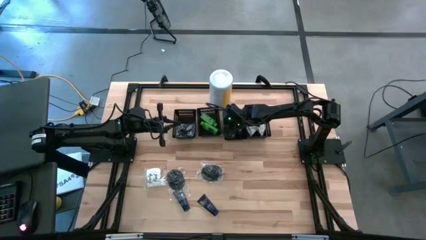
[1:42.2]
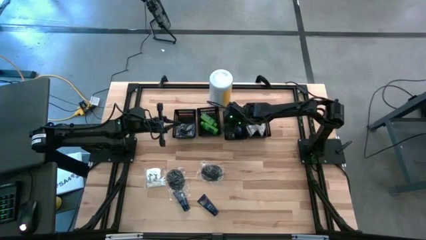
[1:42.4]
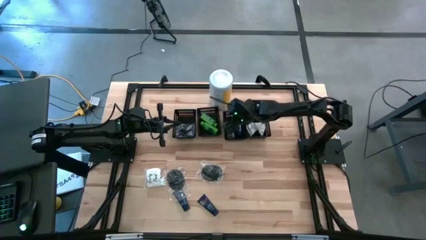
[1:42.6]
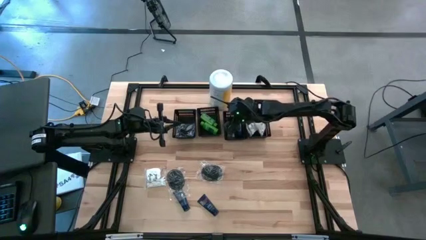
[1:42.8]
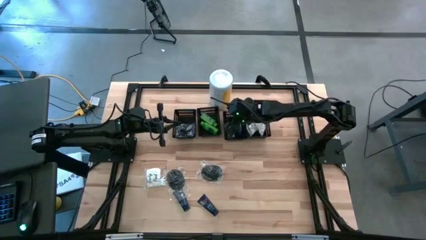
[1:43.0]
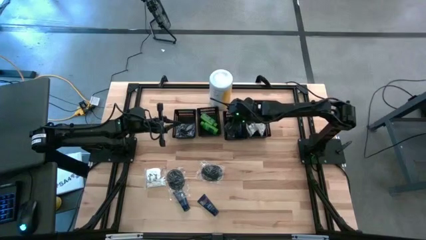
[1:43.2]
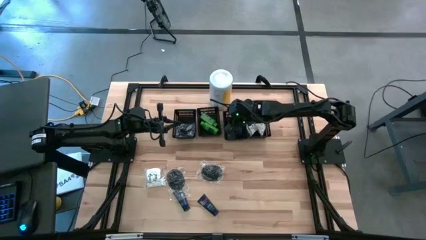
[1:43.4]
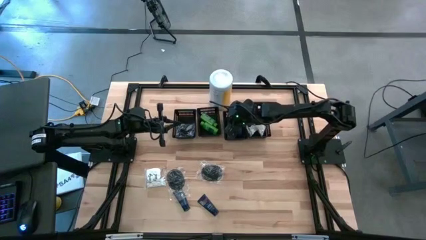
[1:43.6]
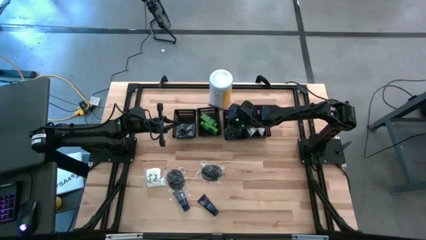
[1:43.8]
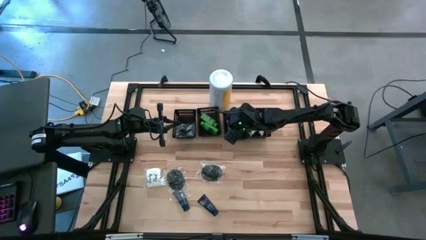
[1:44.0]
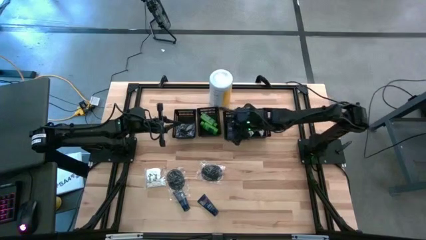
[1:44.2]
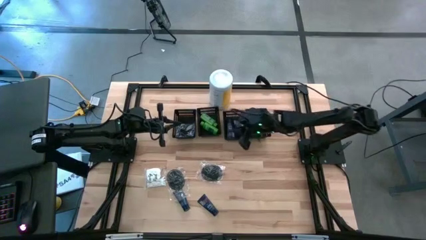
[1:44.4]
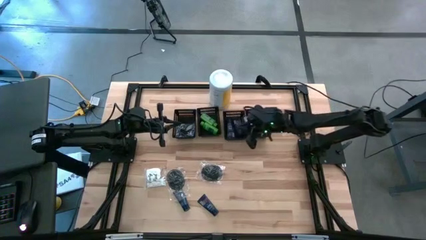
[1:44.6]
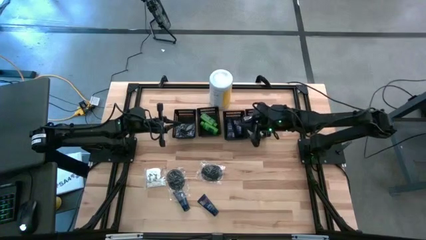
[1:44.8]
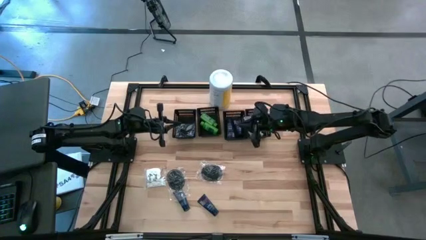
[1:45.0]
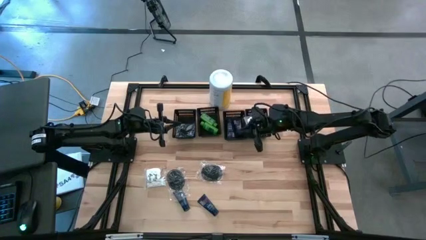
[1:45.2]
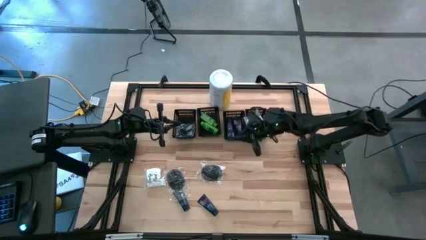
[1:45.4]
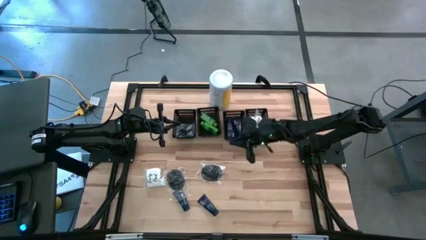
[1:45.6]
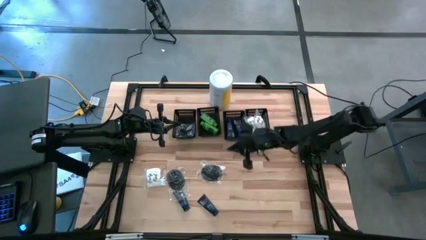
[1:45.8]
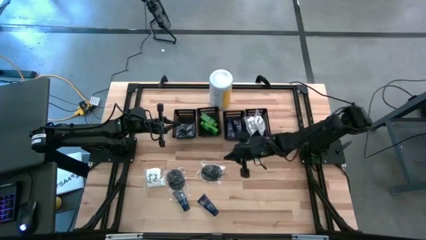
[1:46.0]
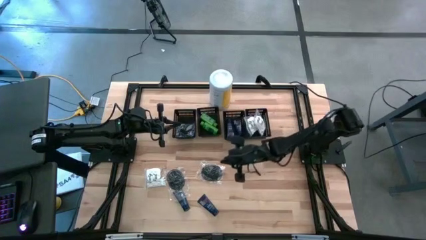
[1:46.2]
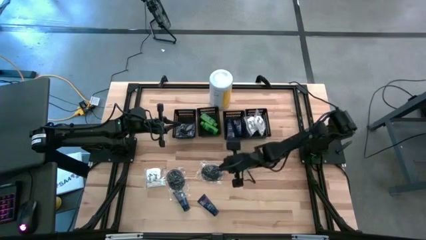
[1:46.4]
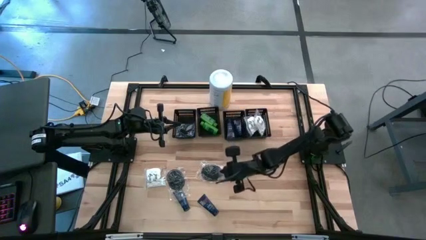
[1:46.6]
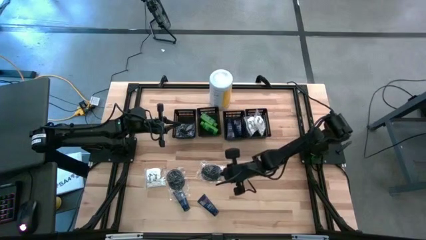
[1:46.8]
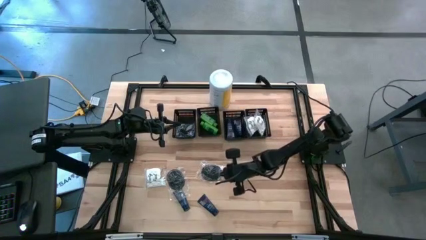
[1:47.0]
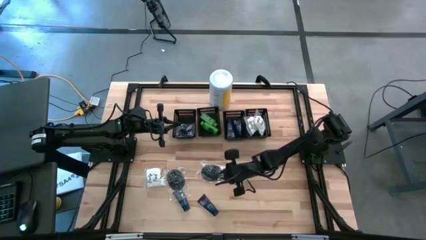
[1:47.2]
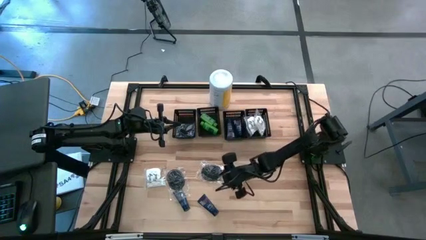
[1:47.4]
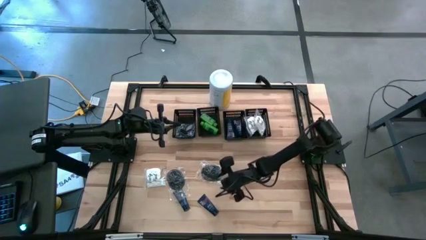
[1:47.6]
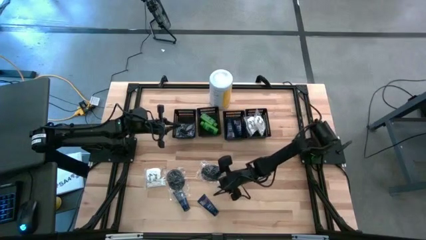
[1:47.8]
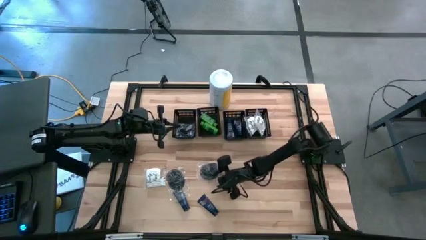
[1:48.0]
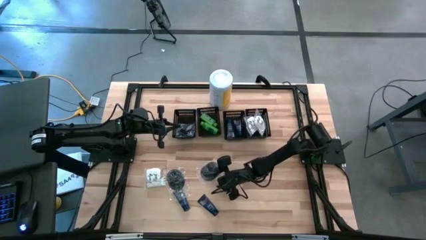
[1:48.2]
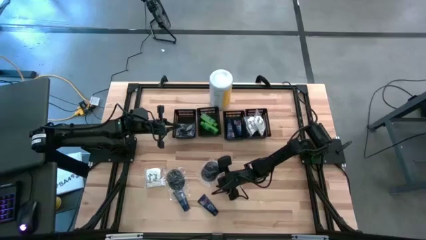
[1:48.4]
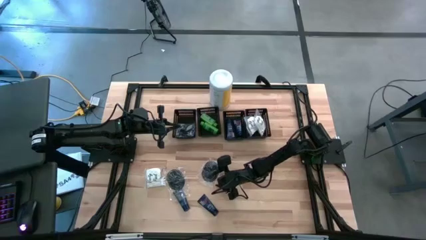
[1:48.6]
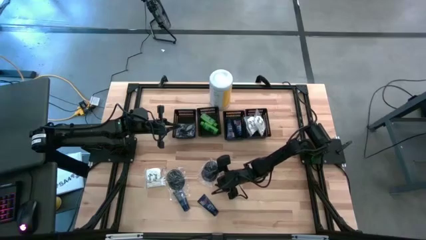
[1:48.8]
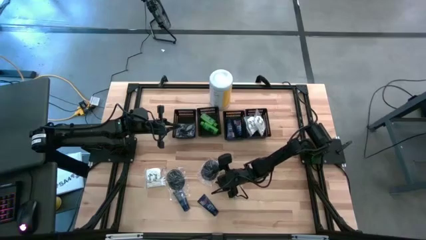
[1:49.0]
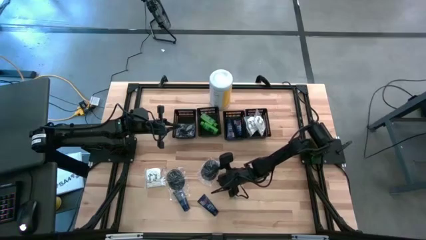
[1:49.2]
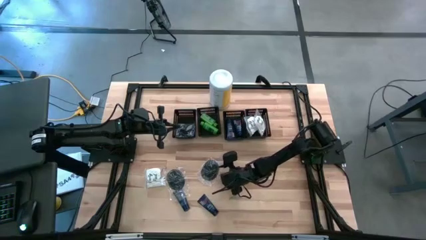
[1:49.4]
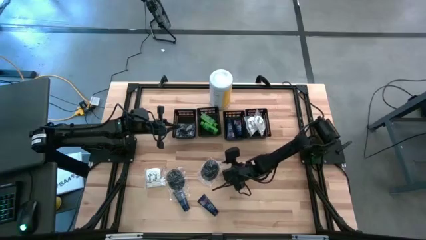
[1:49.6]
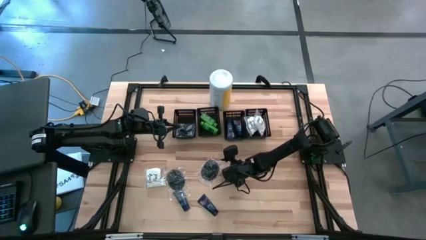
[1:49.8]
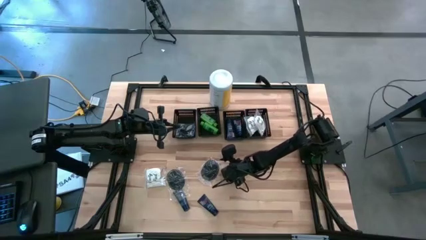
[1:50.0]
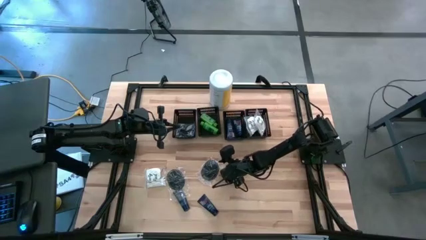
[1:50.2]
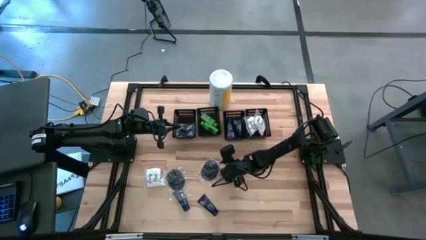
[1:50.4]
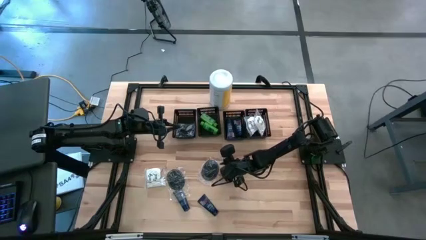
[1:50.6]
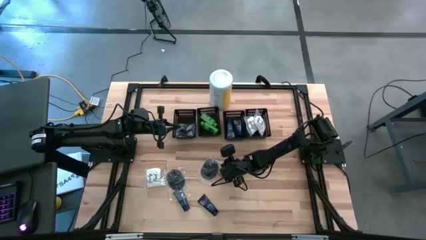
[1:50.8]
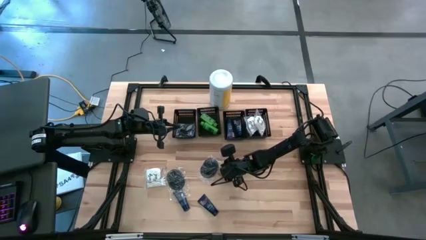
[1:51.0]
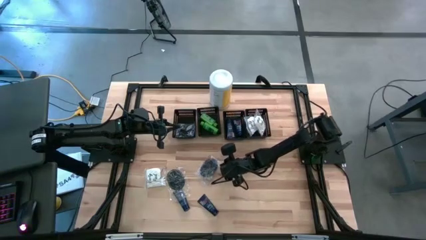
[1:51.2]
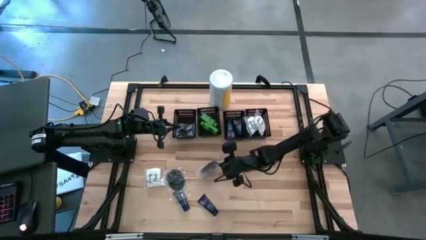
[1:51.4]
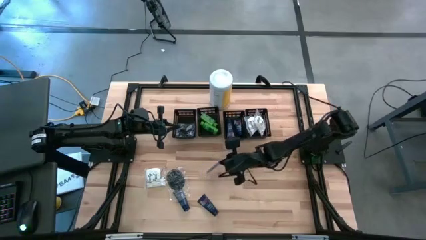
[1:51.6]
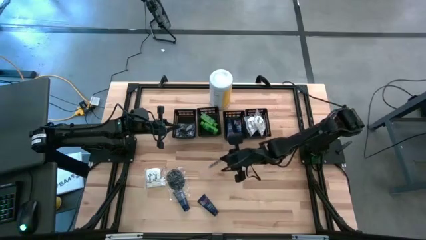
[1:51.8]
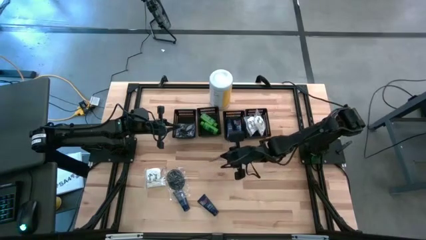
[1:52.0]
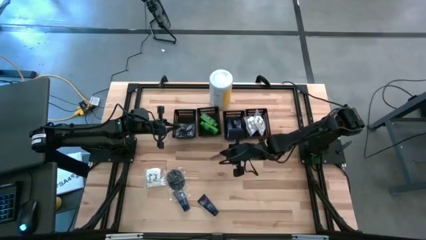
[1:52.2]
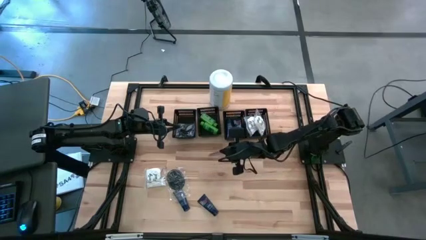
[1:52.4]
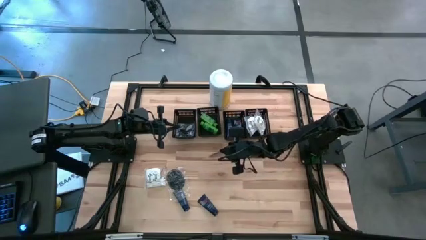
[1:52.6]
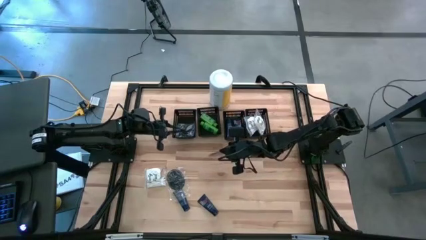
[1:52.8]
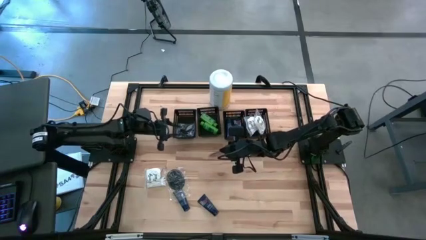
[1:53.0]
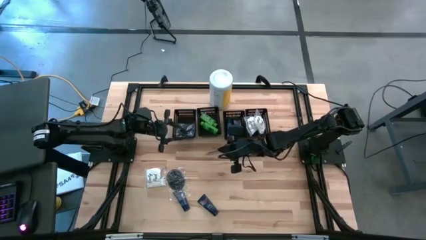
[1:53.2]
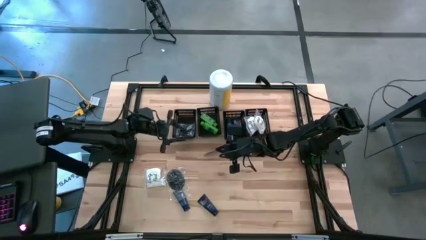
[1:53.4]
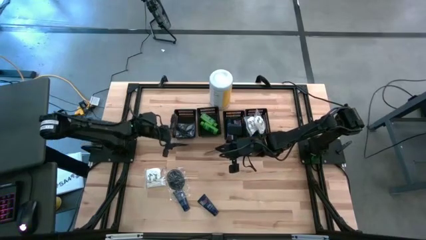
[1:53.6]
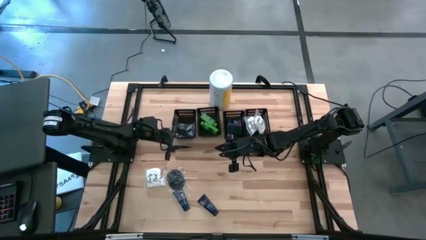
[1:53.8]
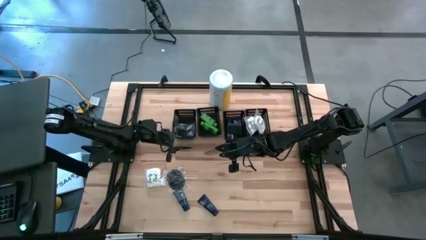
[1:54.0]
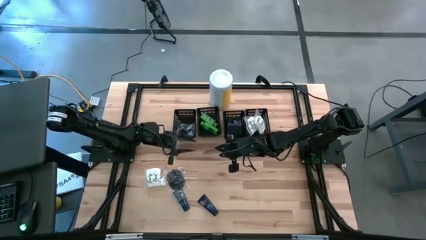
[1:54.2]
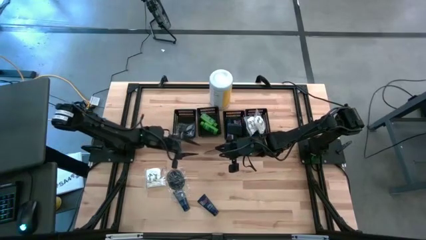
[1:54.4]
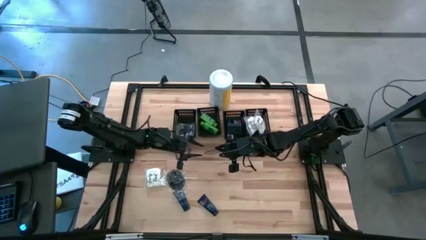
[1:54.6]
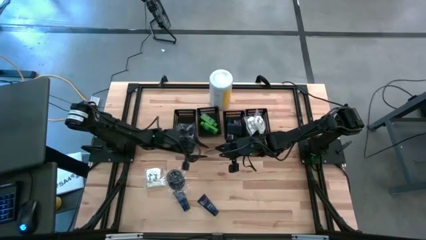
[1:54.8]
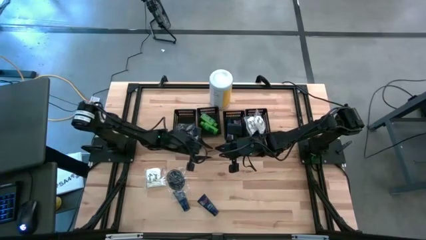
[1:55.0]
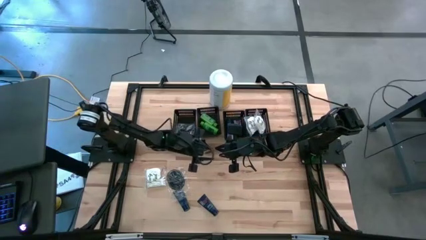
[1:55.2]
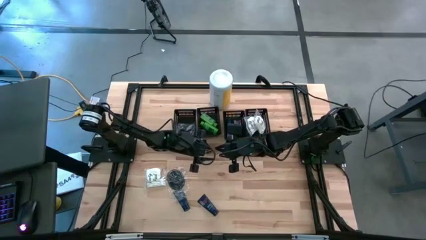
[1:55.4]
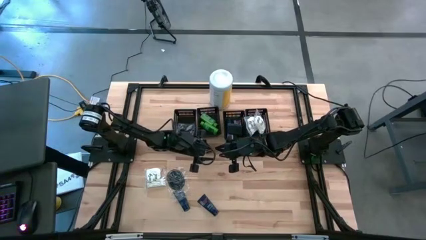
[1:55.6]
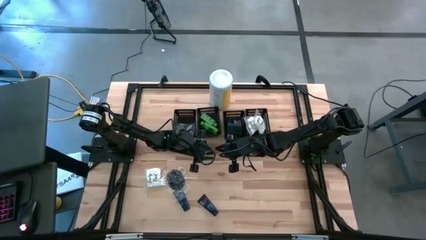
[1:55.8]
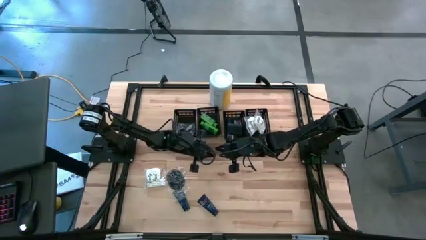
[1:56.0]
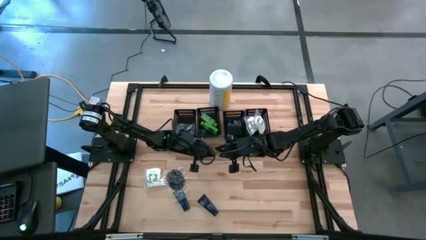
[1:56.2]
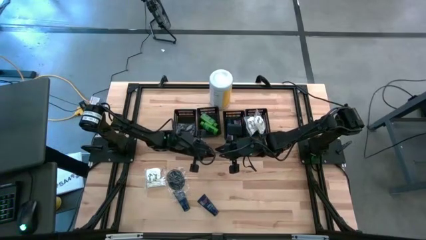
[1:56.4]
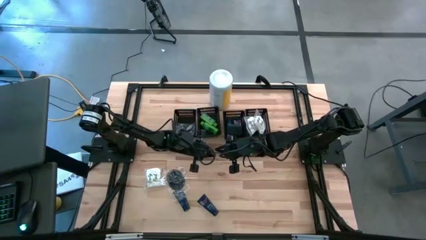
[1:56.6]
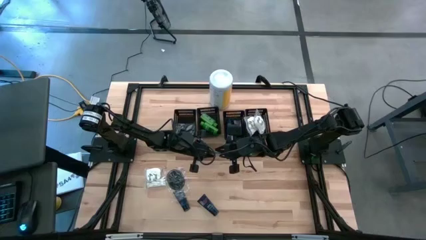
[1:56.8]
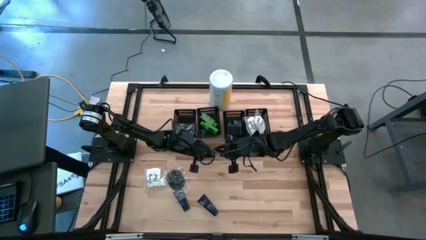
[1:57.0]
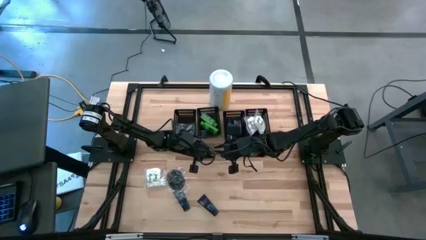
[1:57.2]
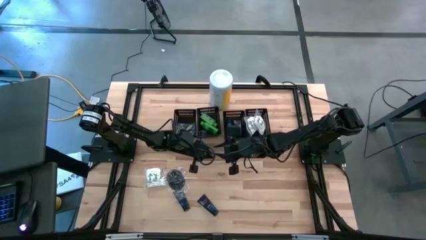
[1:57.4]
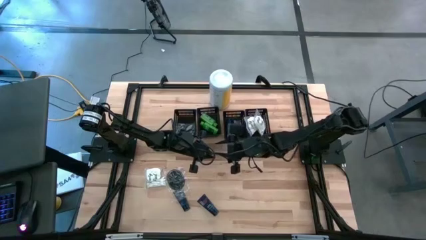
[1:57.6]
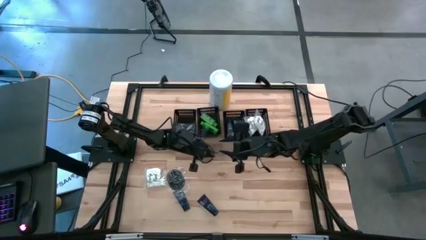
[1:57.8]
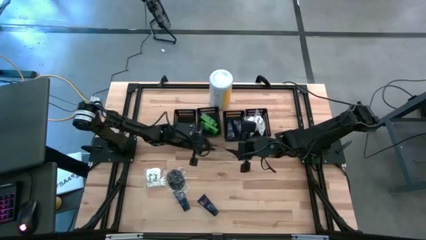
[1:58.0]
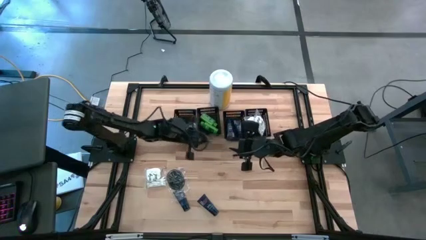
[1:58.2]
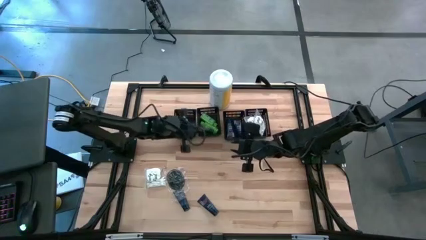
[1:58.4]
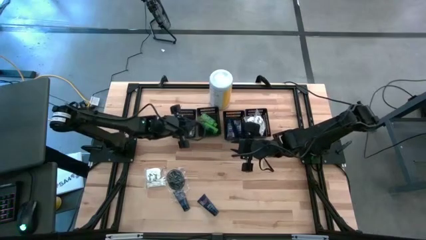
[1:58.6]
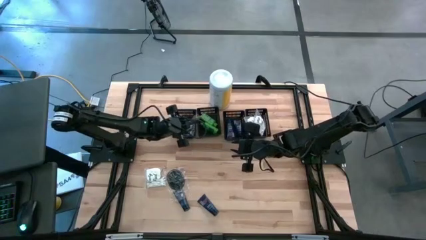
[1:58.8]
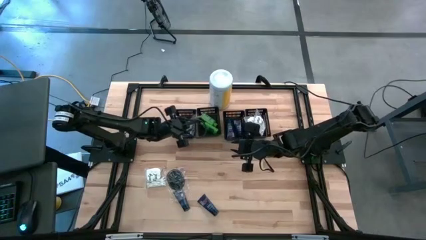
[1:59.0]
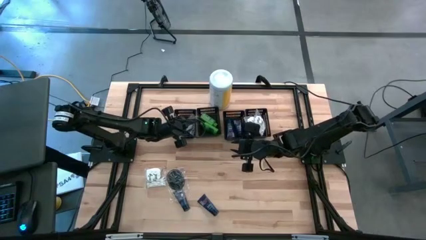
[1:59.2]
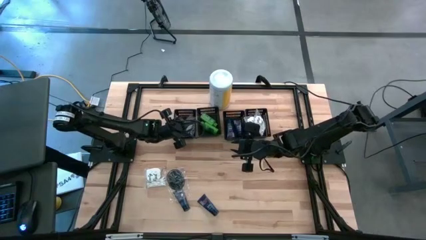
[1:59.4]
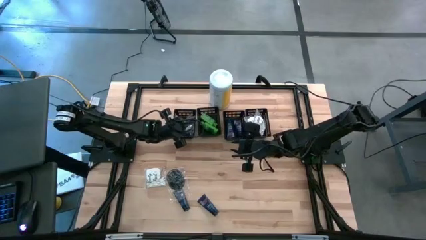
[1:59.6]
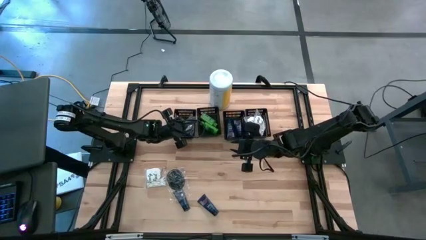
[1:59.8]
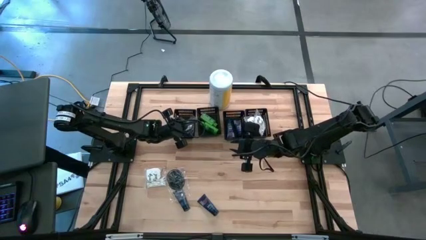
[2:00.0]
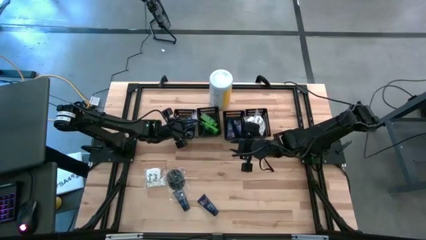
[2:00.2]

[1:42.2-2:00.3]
Task: Pick & Place Travel size toiletries
Put the right hairbrush into the left black bin
